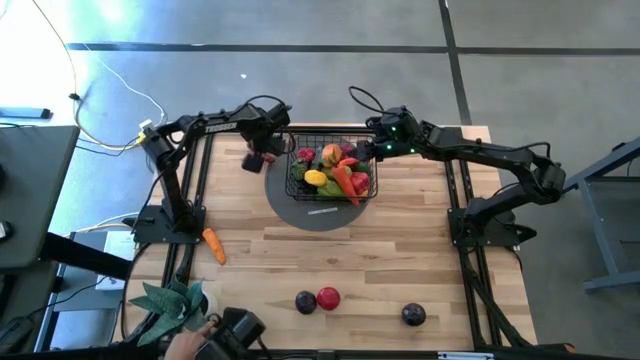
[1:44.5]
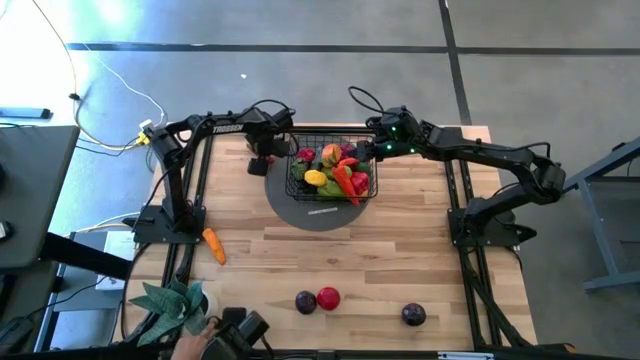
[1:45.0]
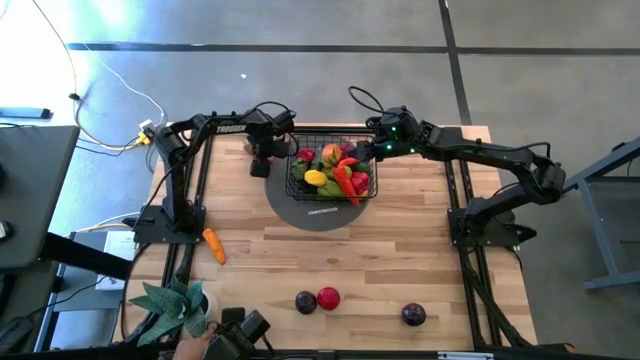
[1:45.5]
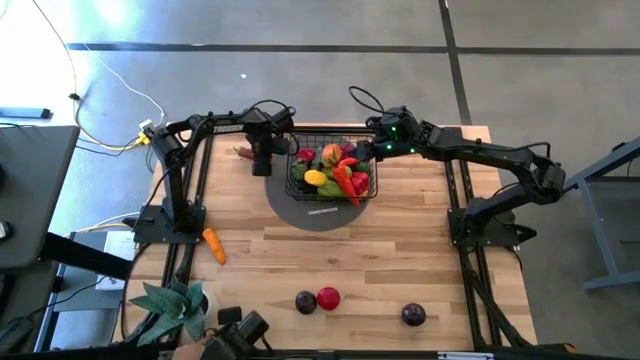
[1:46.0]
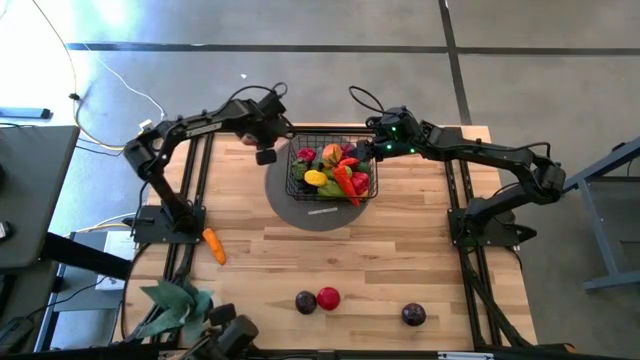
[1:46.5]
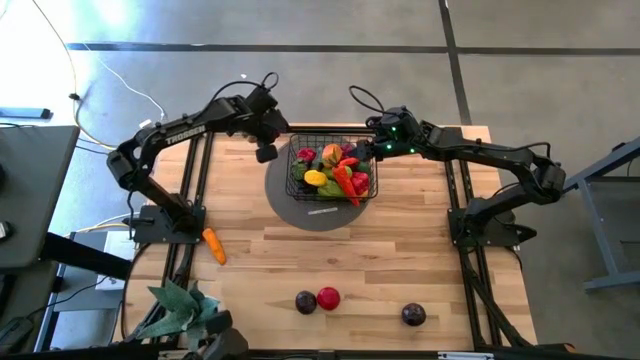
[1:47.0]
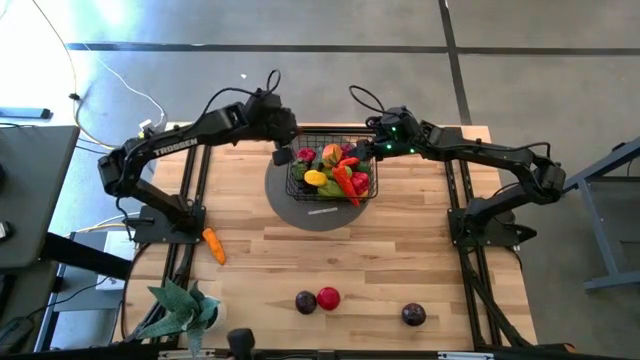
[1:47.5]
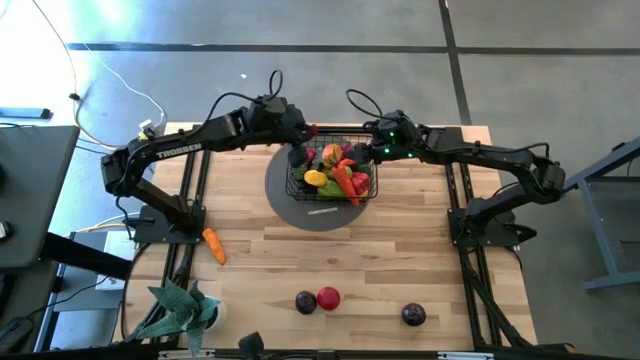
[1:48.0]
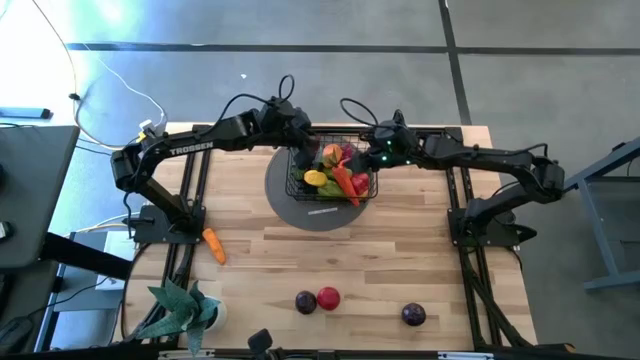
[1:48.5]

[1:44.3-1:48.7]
Task: Build produce basket
Put the red chili pepper into the black mesh basket

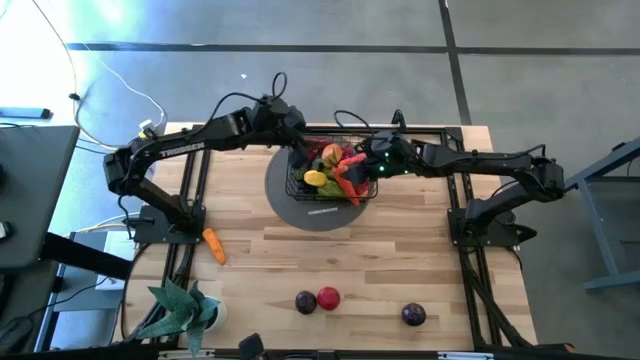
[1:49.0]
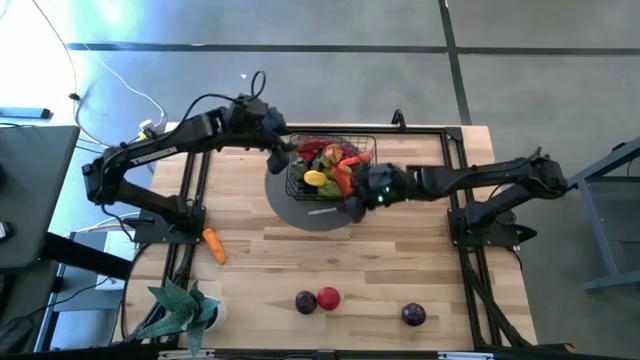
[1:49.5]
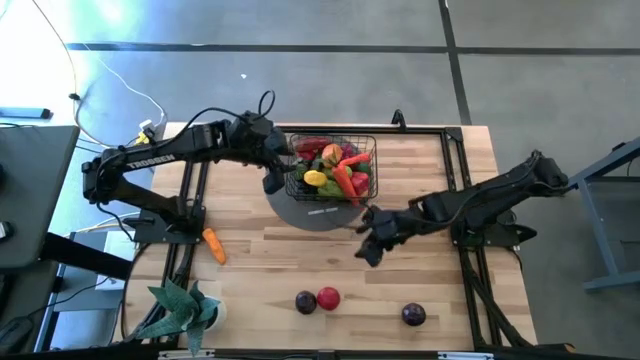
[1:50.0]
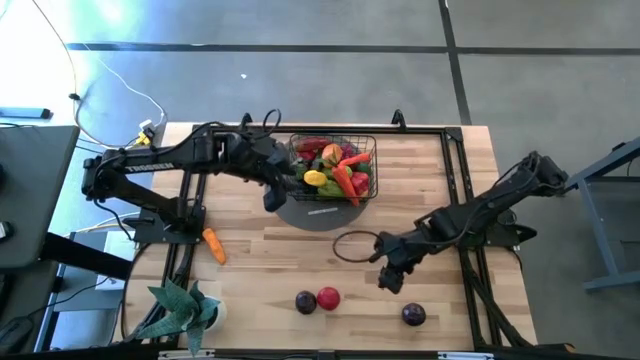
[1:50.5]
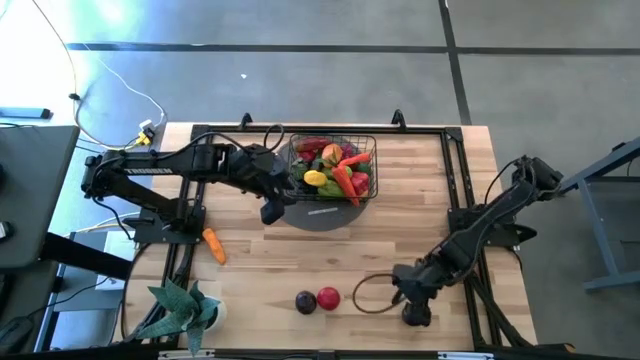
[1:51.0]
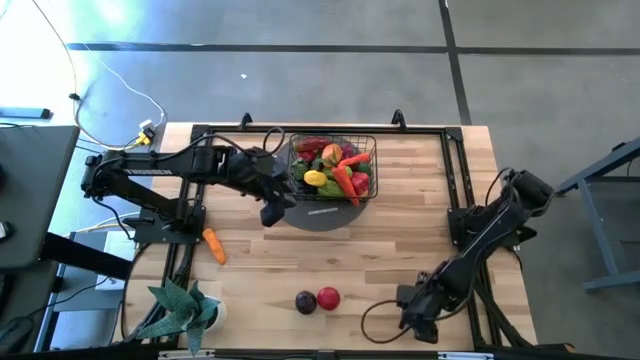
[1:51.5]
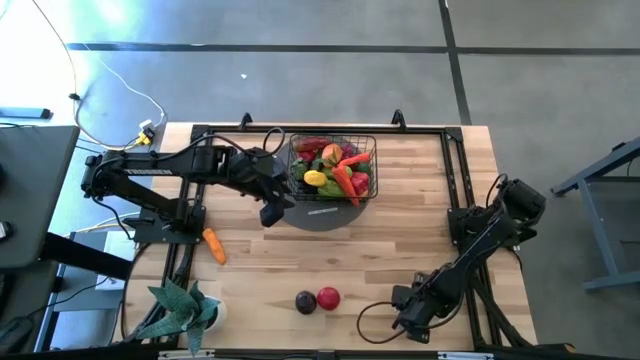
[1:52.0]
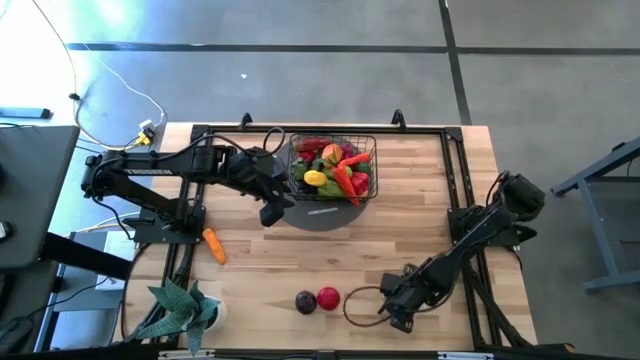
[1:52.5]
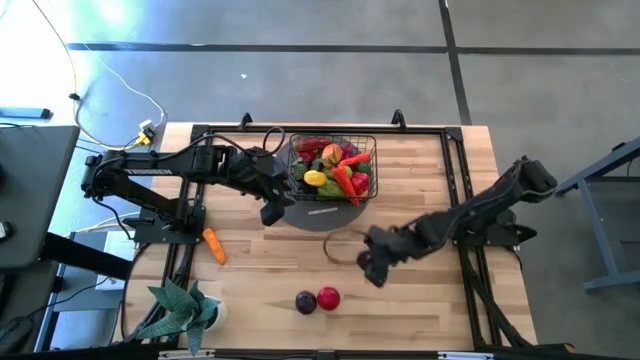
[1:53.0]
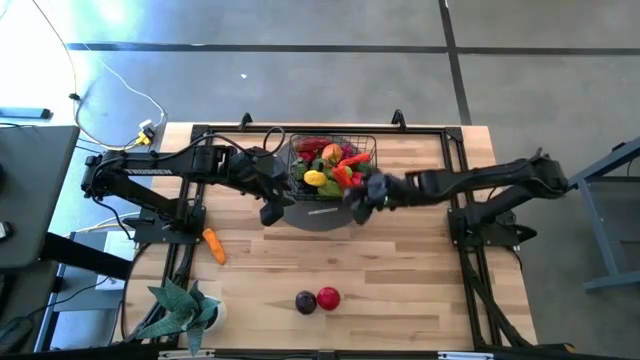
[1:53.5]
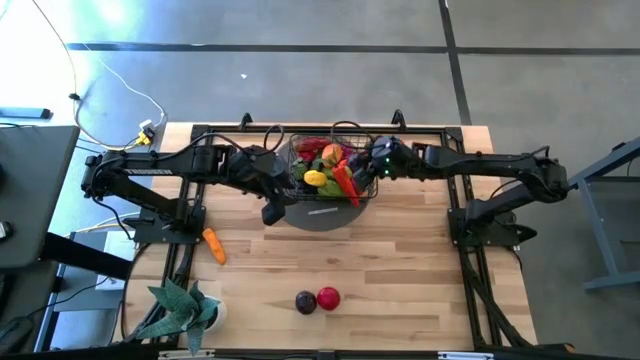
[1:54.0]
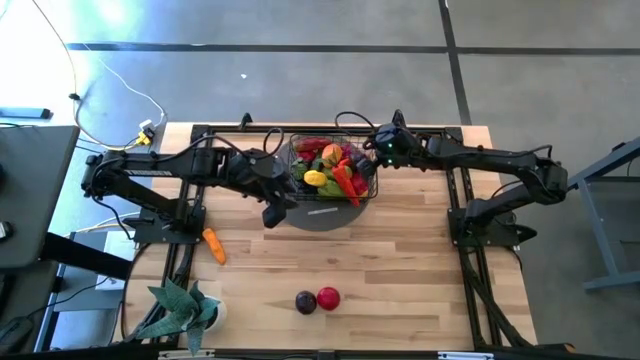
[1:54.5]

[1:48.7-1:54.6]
Put the right dark purple plum into the black mesh basket

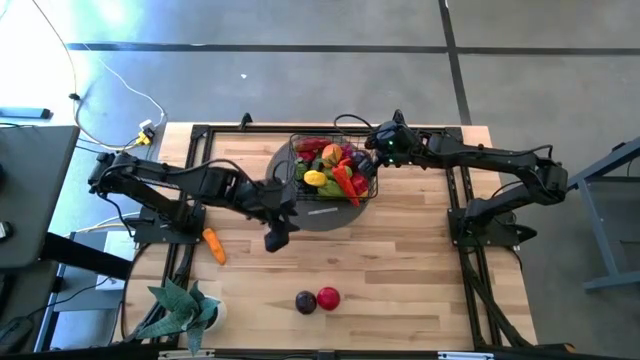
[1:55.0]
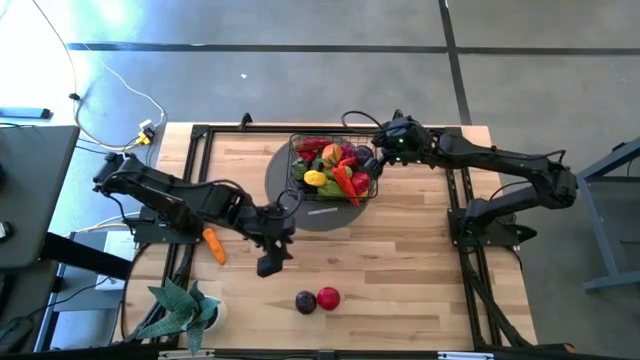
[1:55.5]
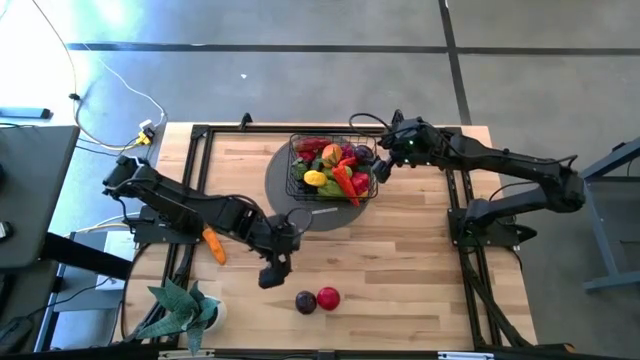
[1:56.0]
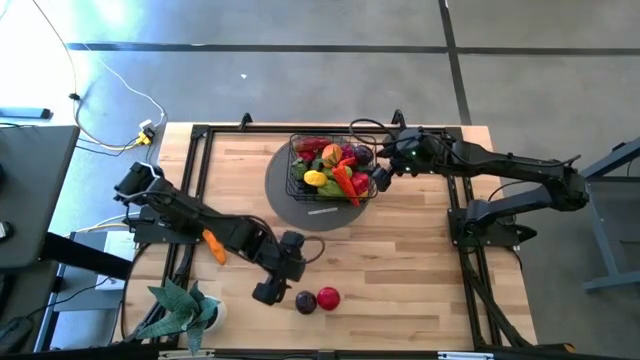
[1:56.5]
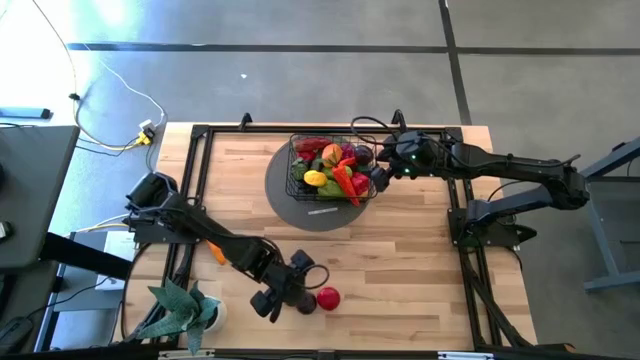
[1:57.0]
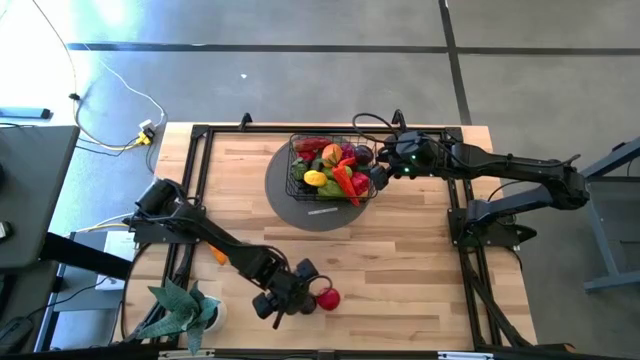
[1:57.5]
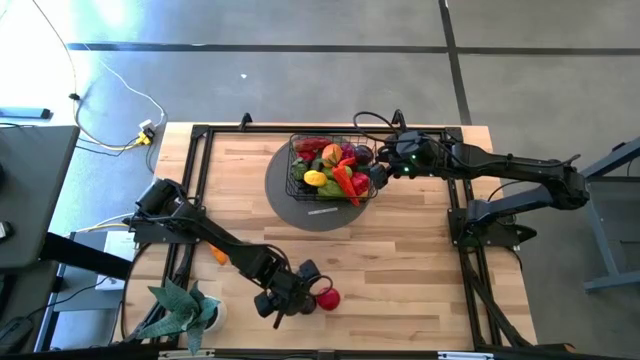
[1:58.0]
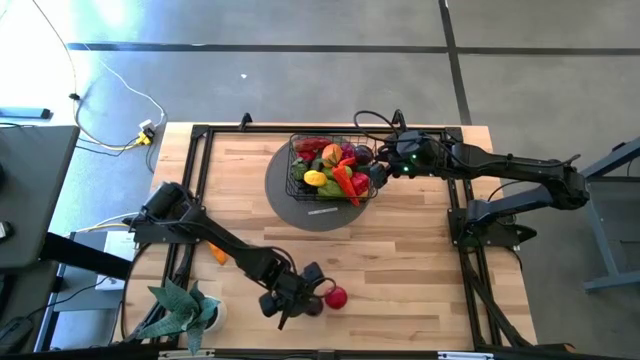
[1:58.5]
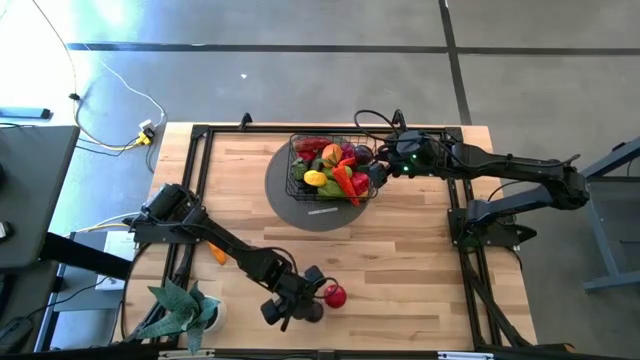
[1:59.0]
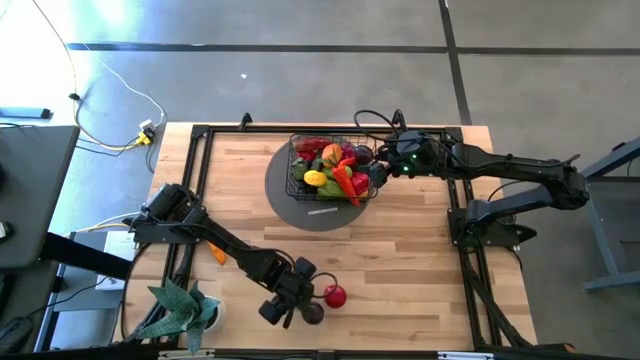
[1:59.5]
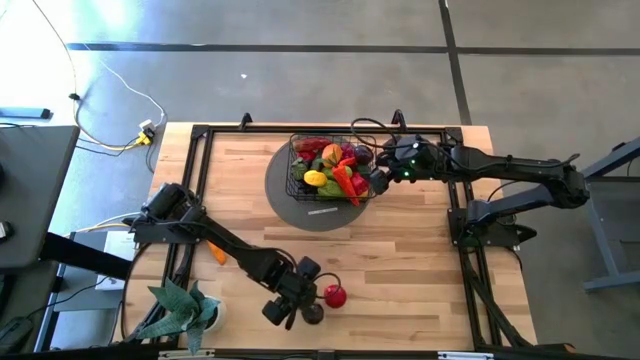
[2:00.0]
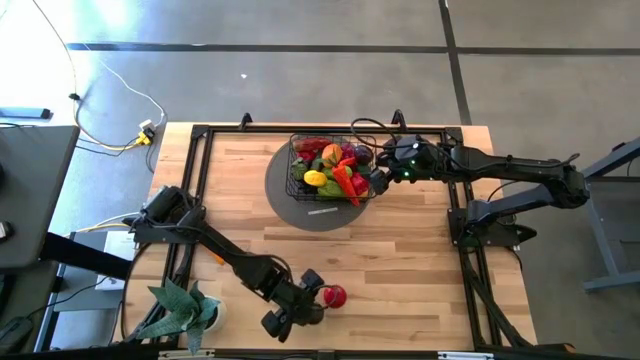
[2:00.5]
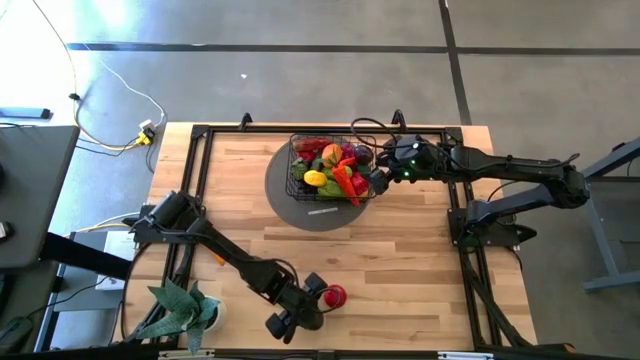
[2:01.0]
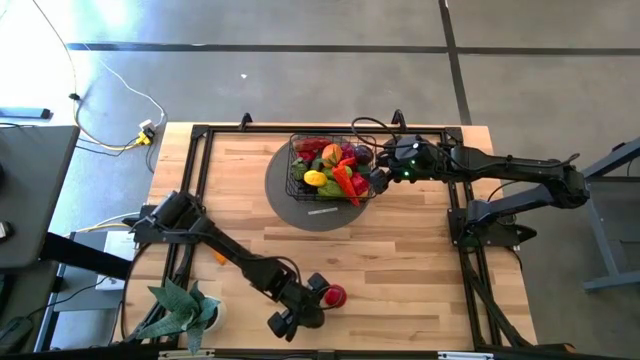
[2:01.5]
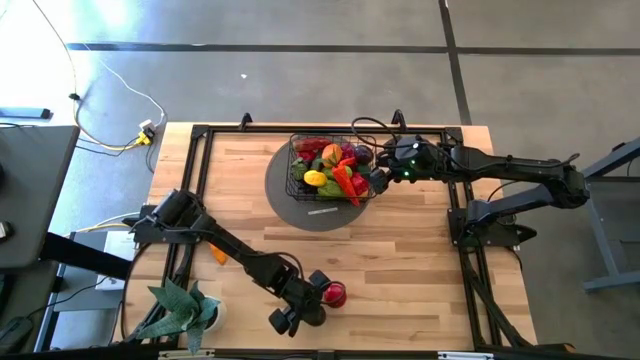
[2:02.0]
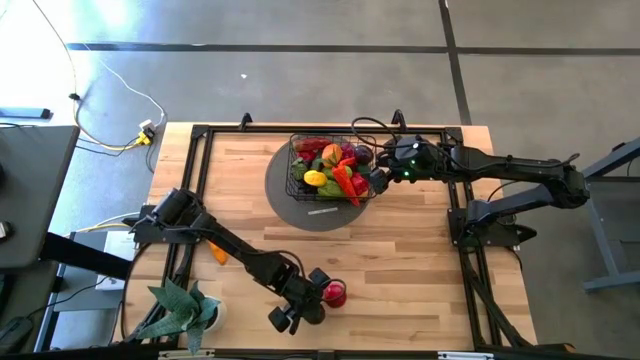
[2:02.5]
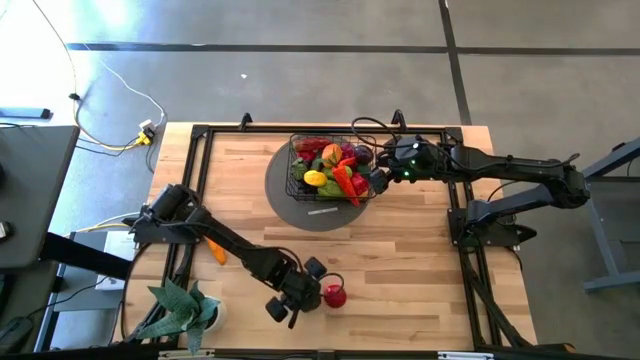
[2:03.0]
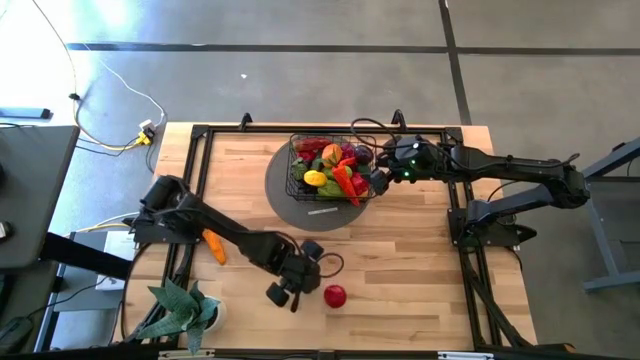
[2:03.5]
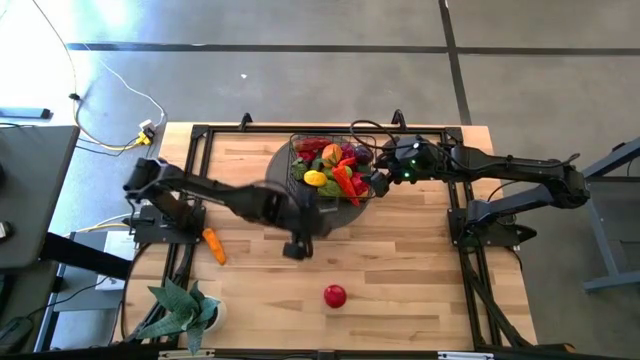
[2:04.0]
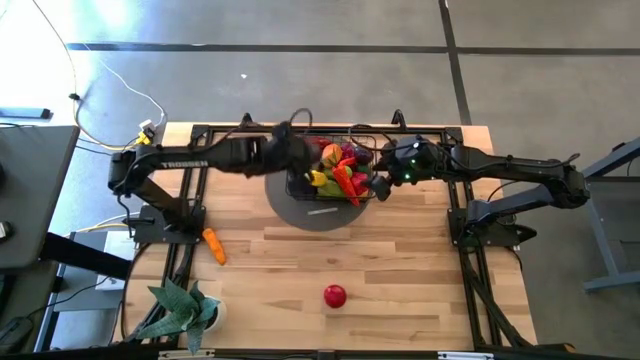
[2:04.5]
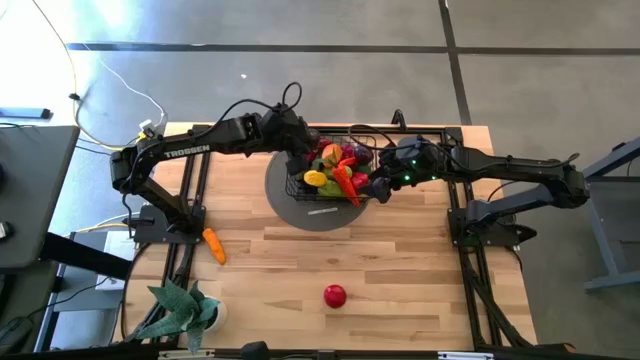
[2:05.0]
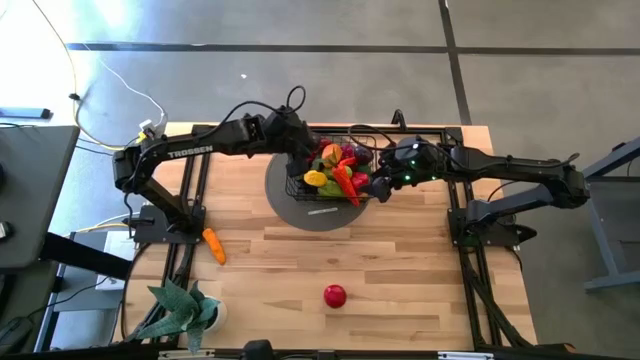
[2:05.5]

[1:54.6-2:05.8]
Put the dark purple plum into the black mesh basket
